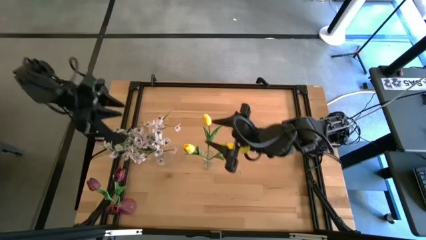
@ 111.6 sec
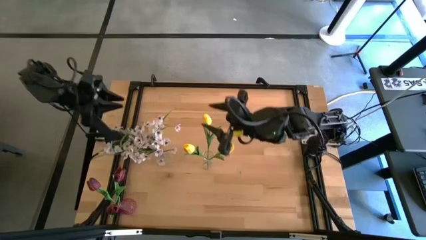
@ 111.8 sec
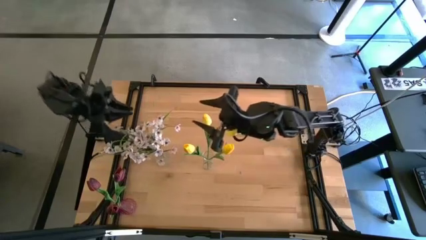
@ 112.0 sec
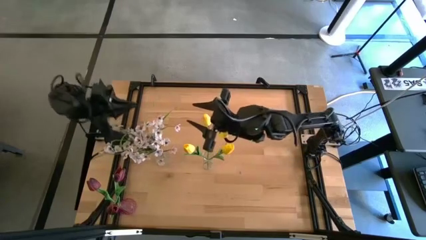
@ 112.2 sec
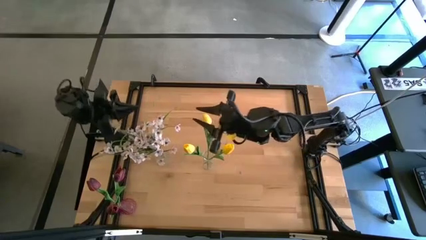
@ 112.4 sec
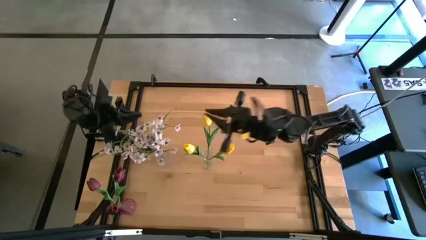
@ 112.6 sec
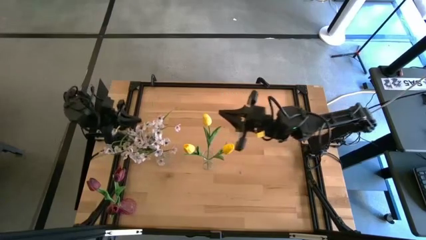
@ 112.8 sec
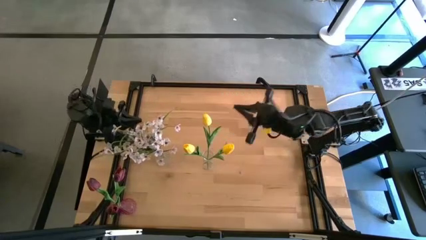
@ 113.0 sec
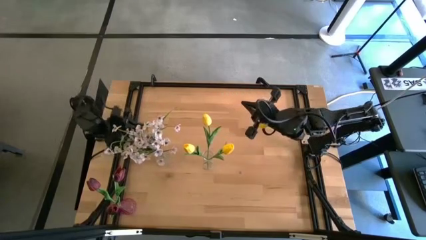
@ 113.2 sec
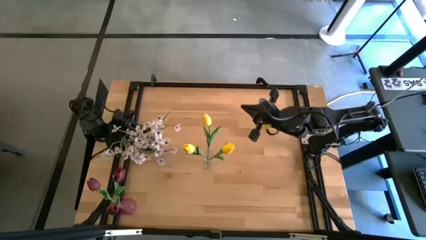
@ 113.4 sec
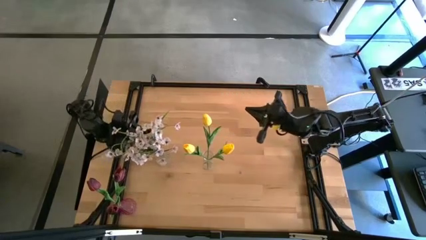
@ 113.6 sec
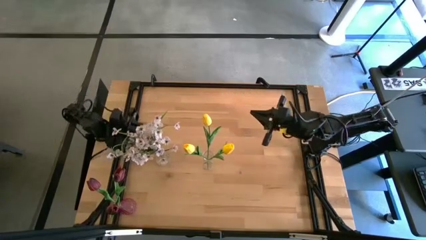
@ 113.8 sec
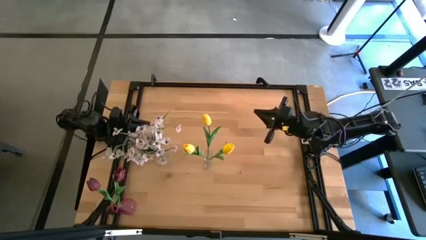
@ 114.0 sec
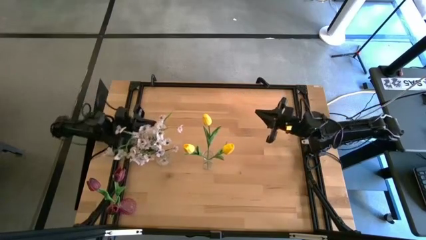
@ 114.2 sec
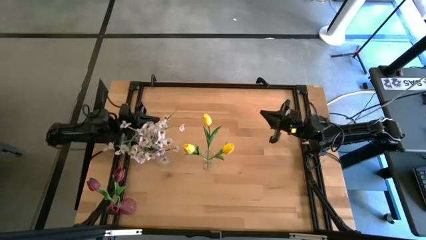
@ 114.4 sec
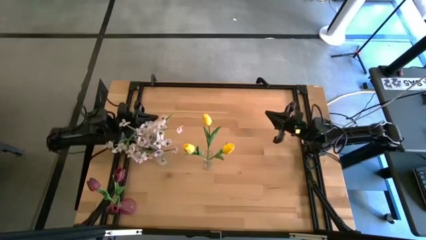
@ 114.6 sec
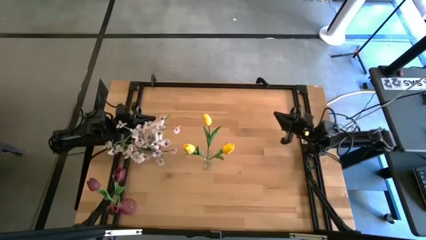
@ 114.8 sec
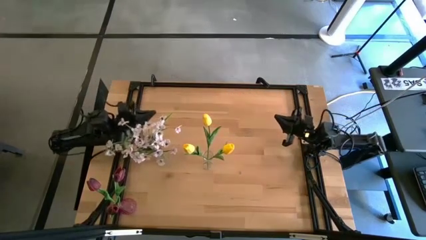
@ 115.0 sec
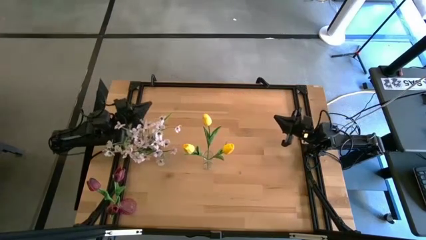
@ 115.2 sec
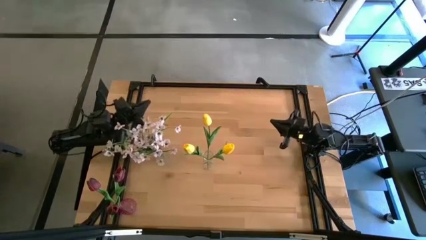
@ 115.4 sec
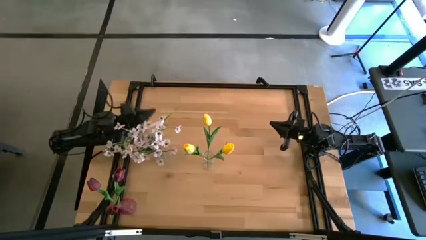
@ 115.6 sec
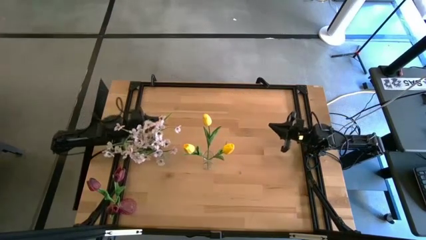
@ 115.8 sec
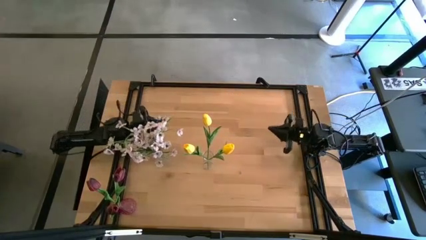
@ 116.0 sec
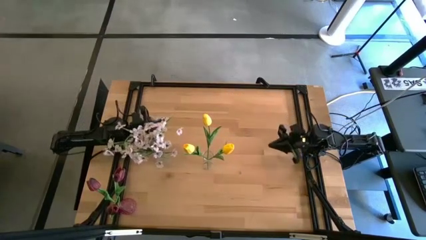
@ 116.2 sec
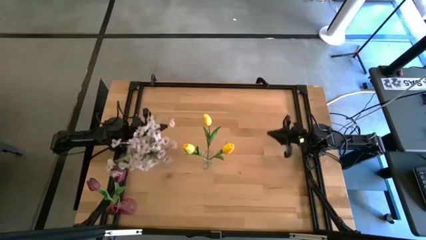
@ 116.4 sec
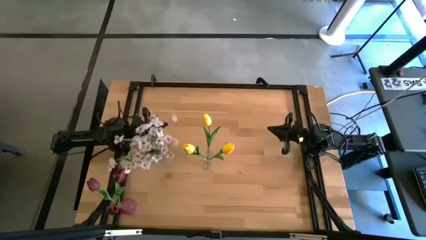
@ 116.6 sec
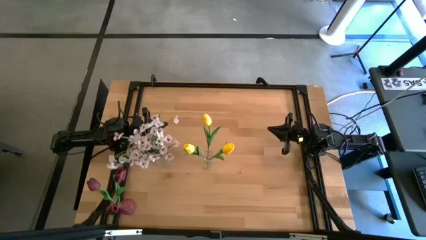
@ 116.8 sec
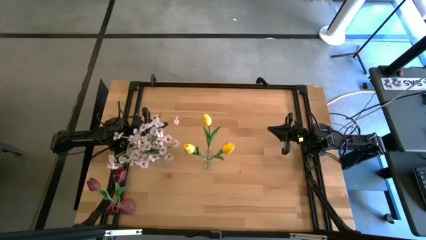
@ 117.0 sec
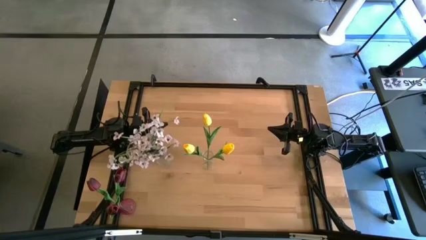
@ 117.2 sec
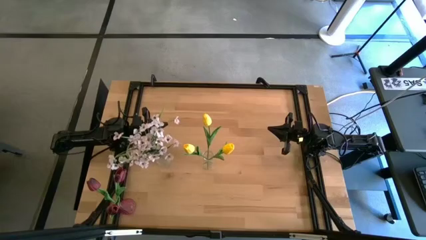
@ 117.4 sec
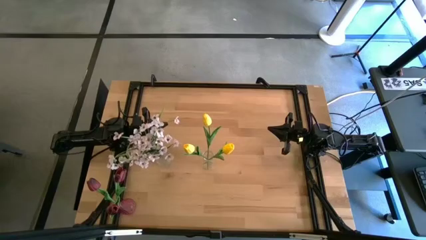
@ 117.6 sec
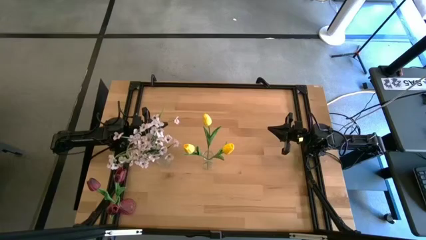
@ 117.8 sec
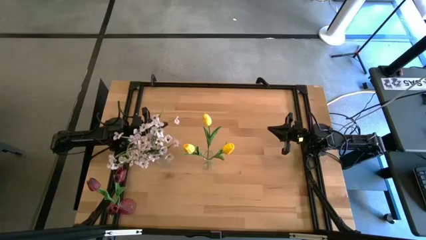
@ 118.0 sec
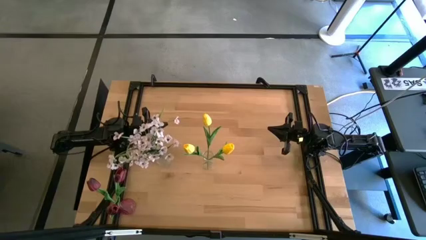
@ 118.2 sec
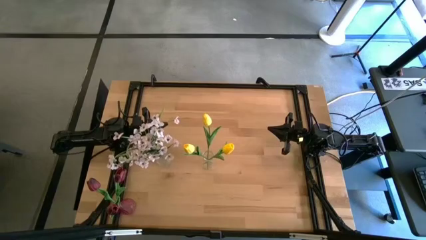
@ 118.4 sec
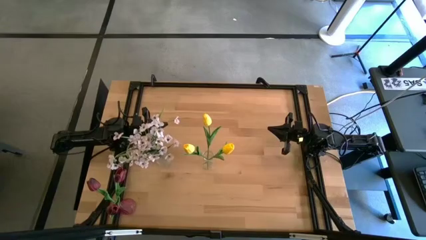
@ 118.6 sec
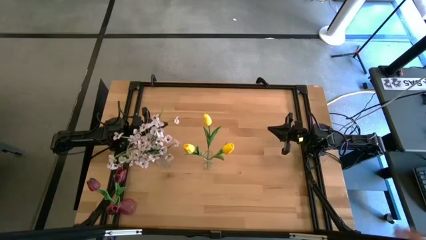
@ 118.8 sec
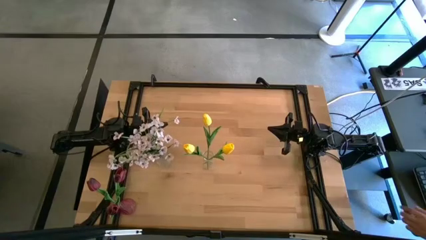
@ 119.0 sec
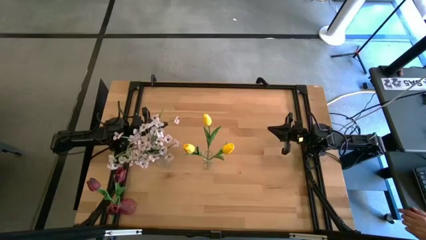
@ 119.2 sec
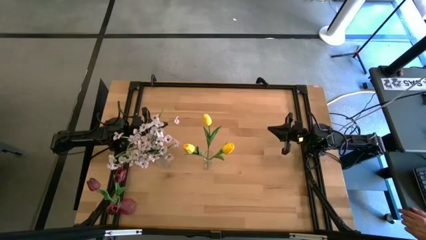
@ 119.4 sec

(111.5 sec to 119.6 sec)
Task: Sort flowers into vase by color
Return to Home Position
